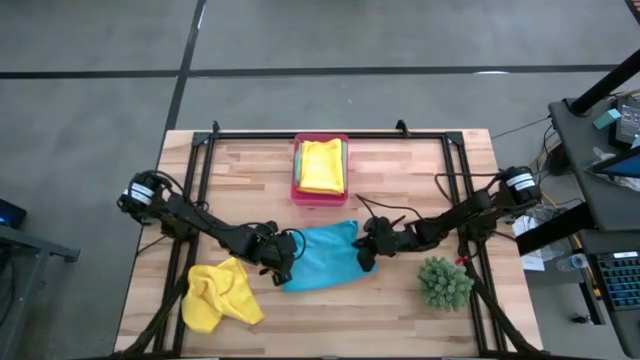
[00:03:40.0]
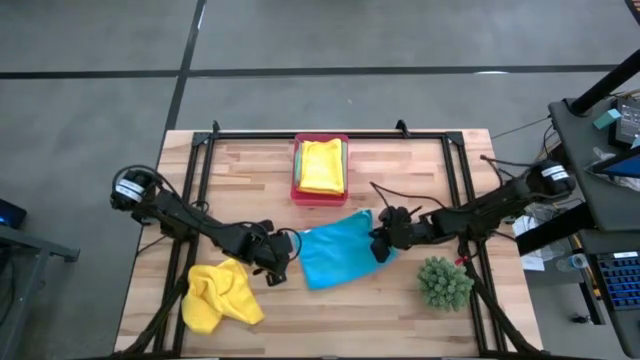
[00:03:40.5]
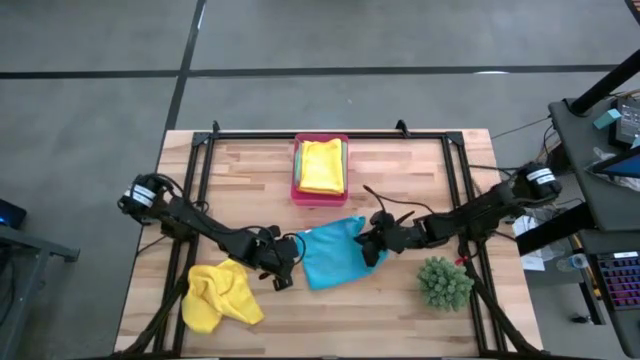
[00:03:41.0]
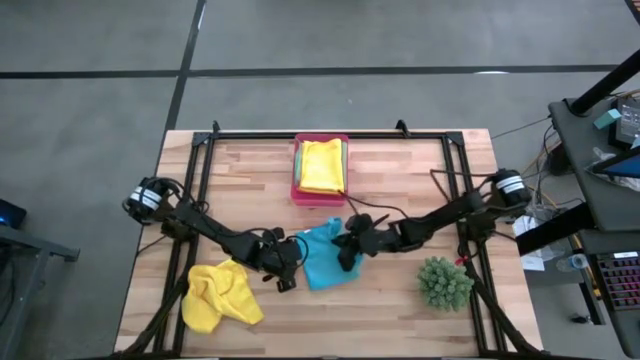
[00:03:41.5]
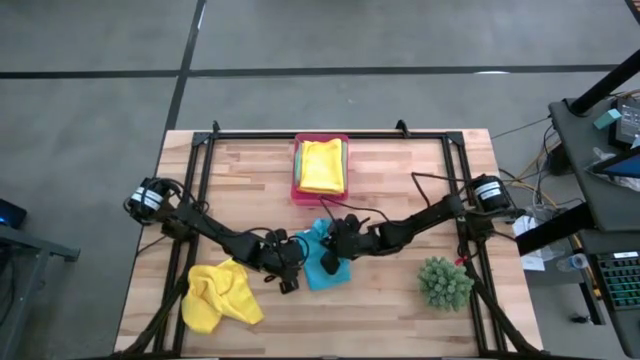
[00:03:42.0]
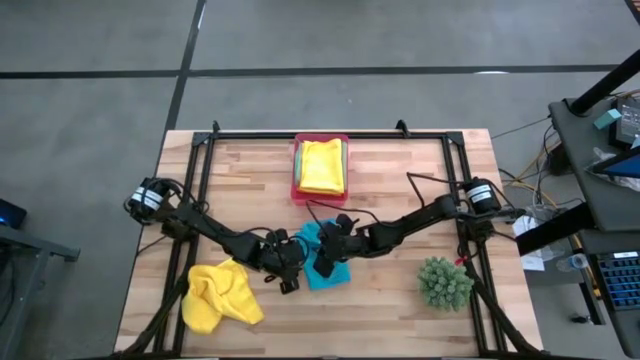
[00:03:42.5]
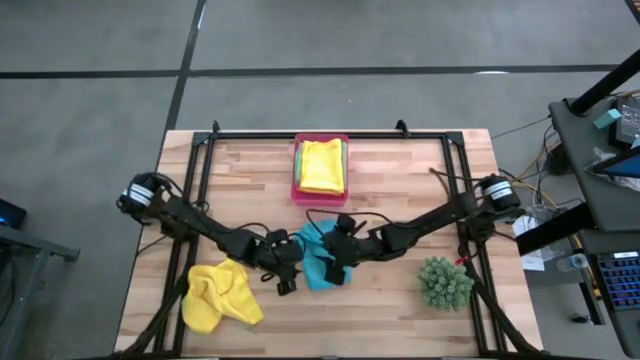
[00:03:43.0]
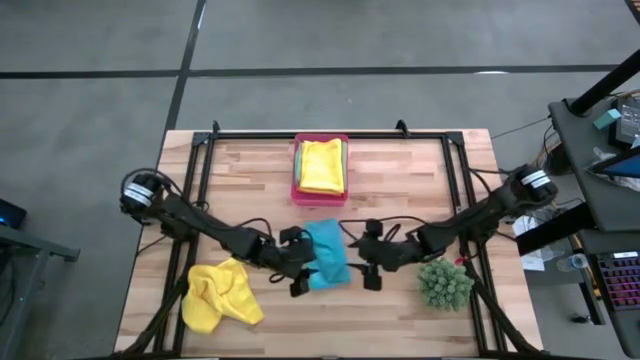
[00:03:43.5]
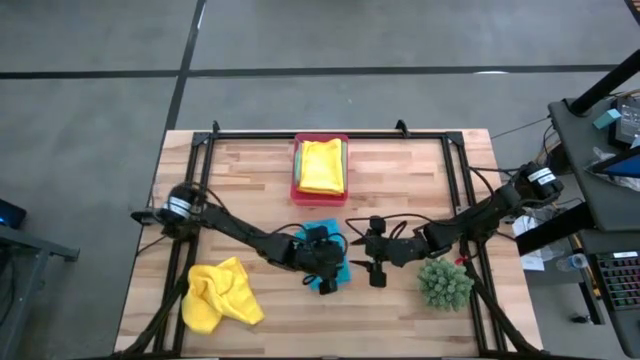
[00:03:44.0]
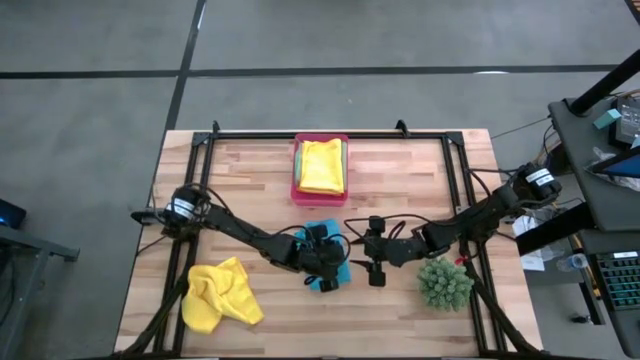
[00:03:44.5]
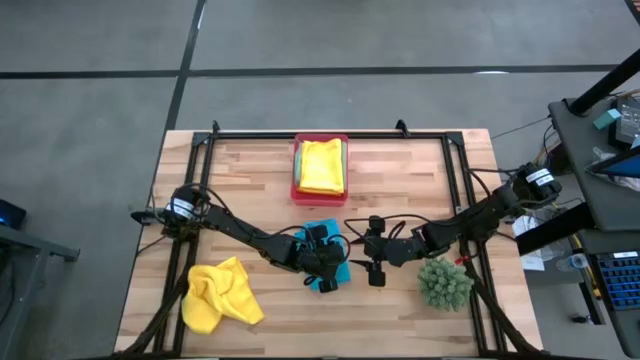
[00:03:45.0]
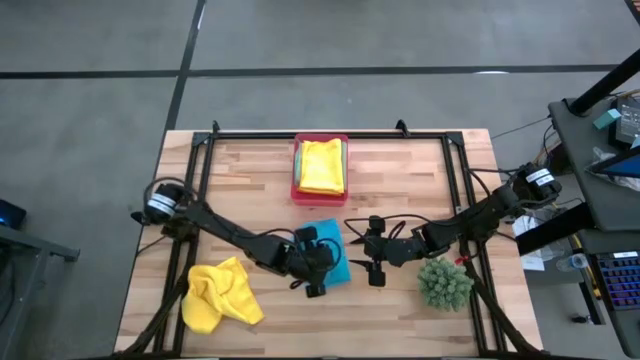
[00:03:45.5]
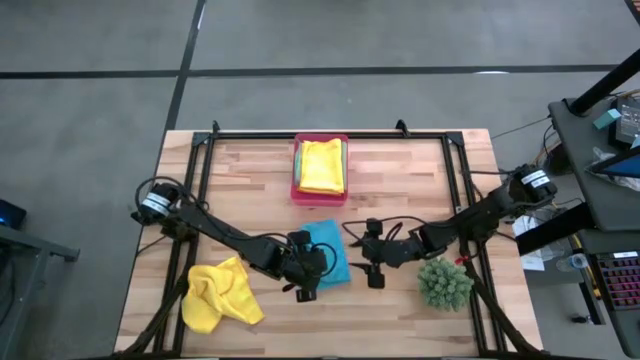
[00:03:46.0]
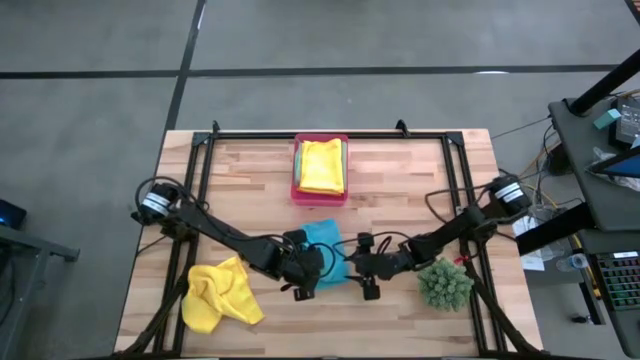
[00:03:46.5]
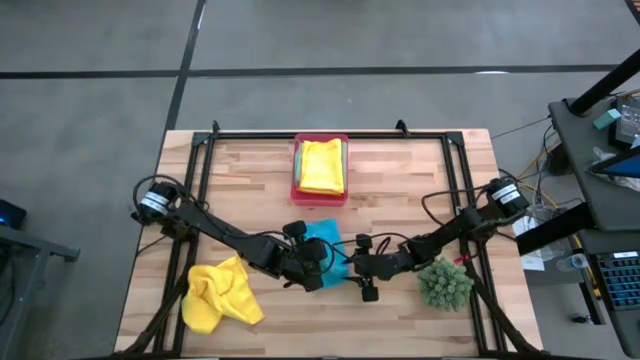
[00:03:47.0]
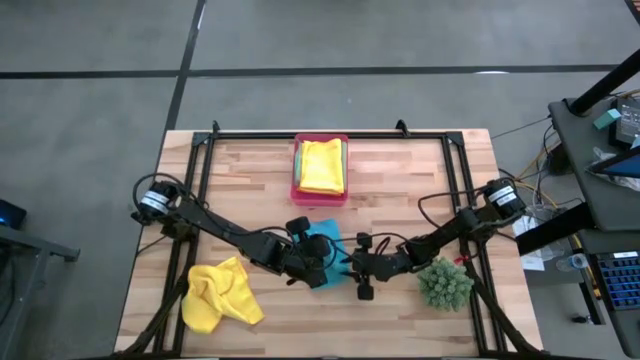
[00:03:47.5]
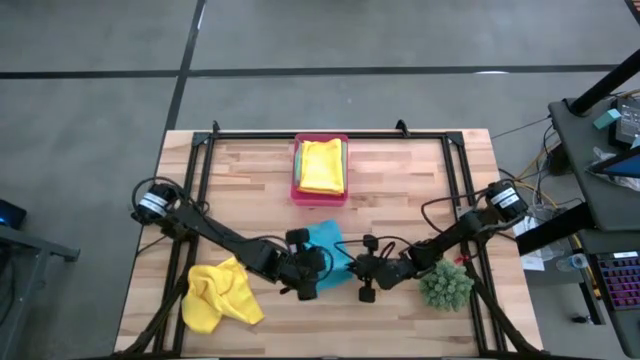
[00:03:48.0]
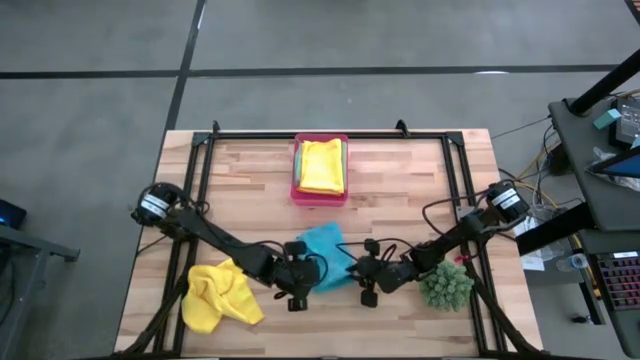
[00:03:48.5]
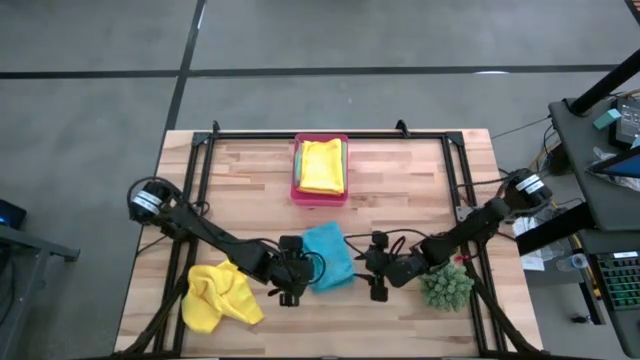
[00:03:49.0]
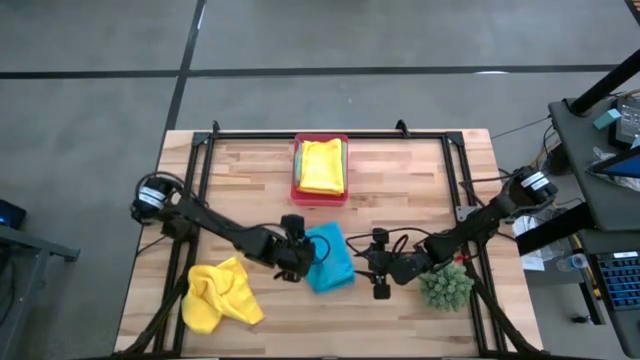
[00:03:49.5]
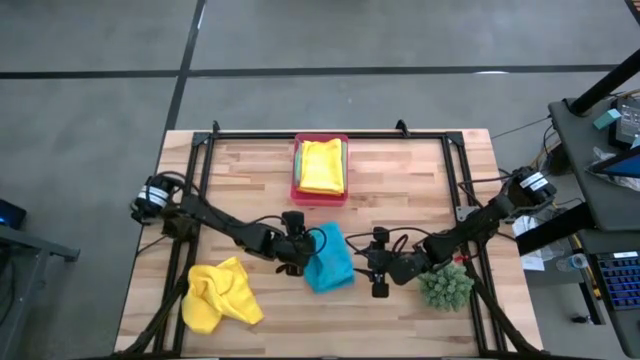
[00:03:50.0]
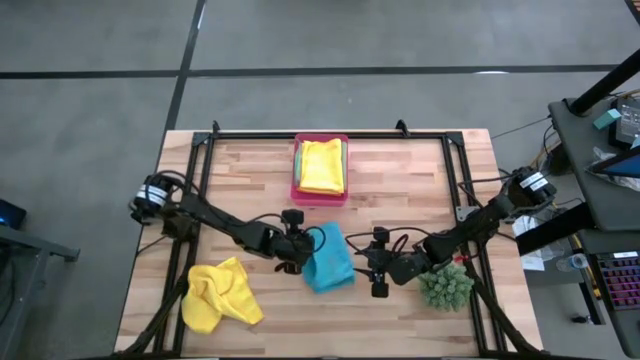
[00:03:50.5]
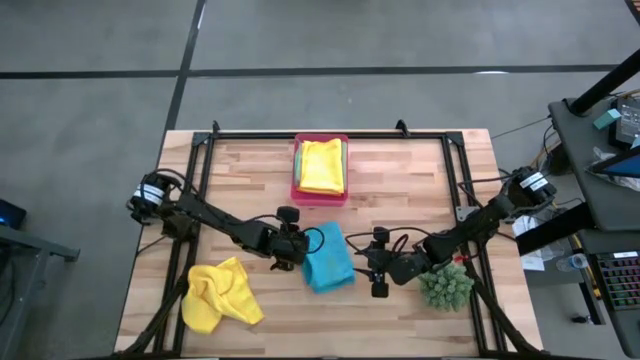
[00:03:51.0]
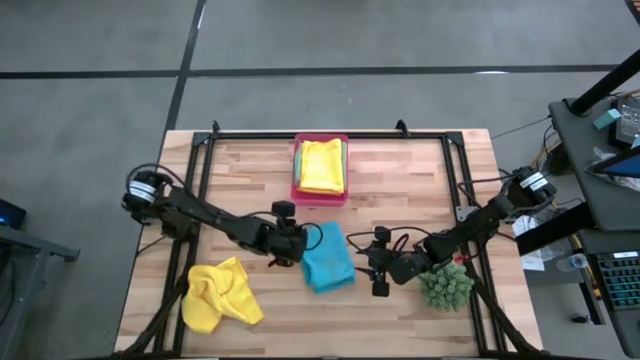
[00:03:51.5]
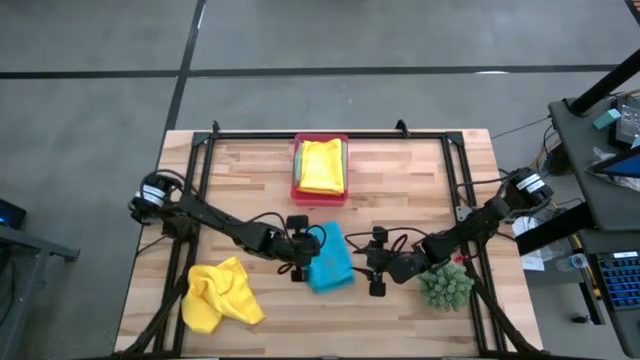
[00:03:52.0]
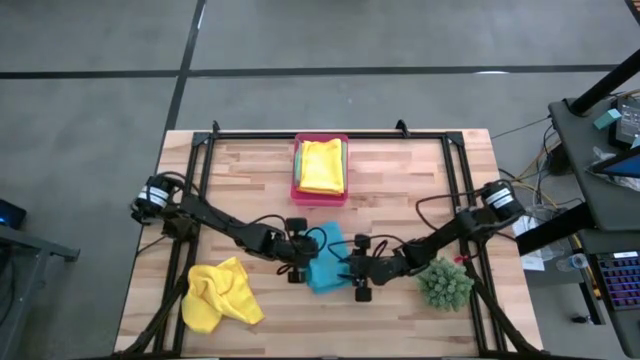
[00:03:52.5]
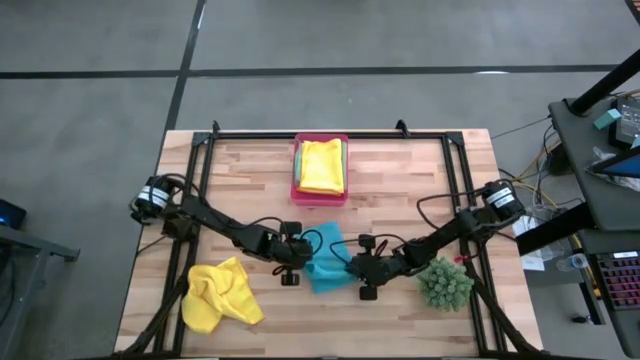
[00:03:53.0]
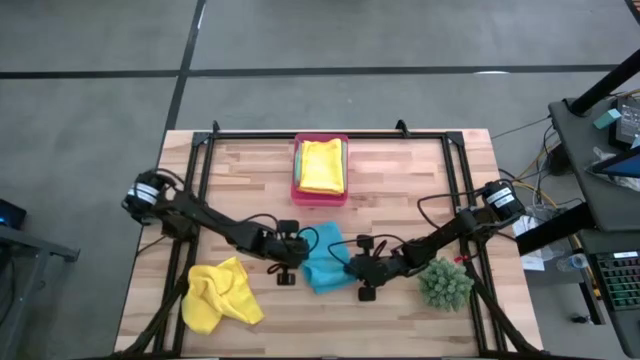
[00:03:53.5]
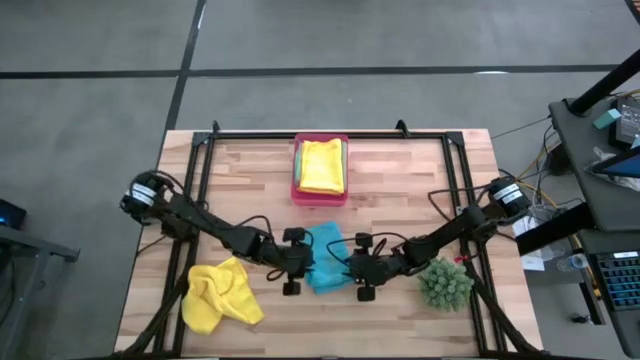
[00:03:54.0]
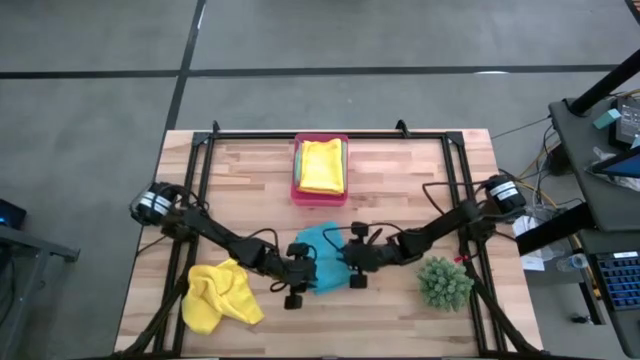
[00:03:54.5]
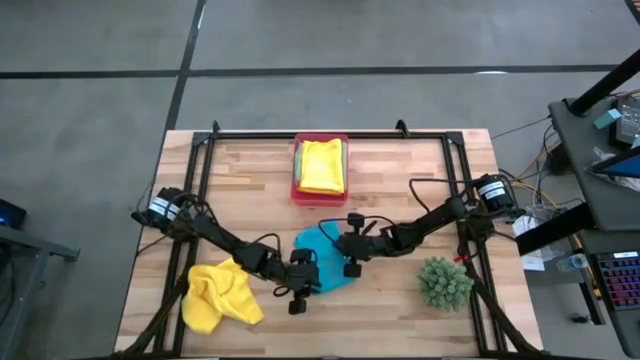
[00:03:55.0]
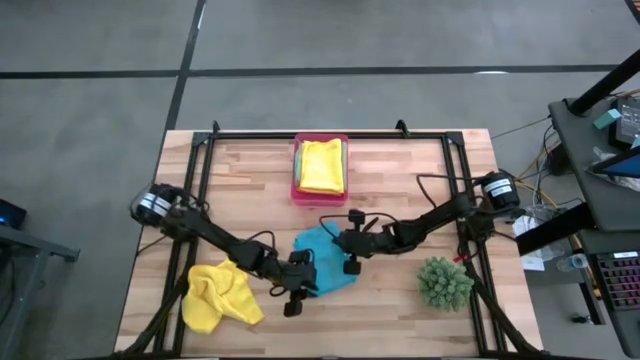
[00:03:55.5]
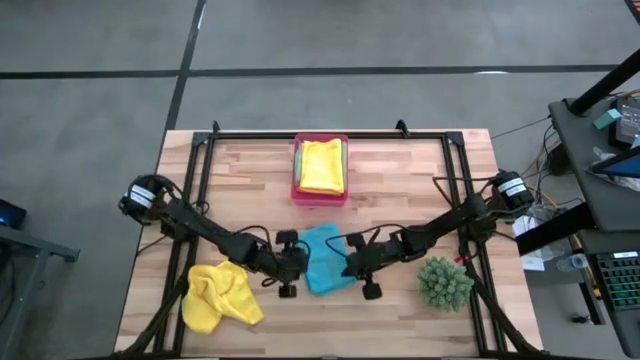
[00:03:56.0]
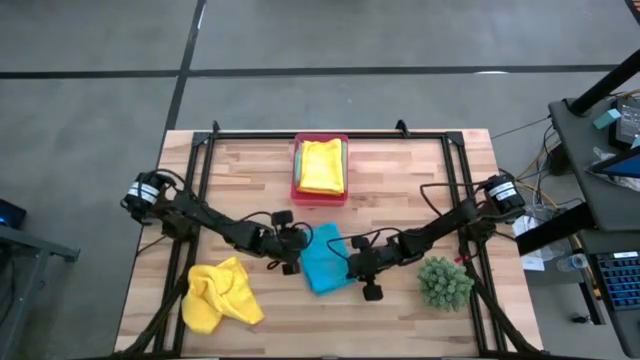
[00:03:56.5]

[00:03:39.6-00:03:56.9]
Task: Fold microfiber towels
Fold the blue towel
